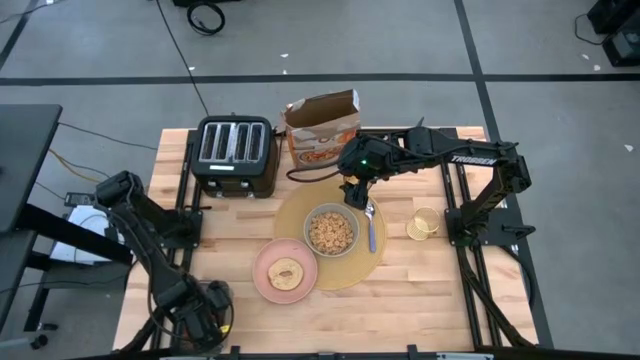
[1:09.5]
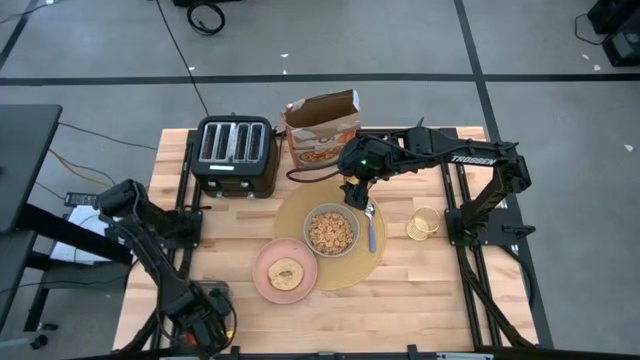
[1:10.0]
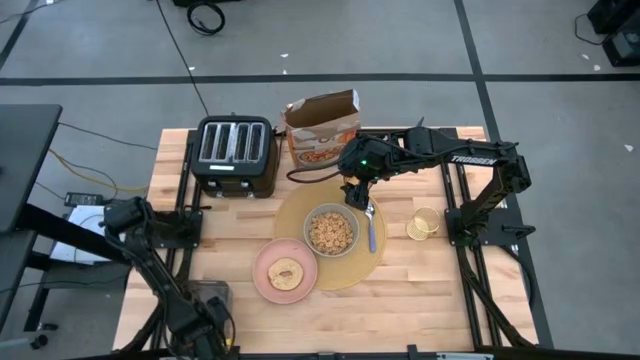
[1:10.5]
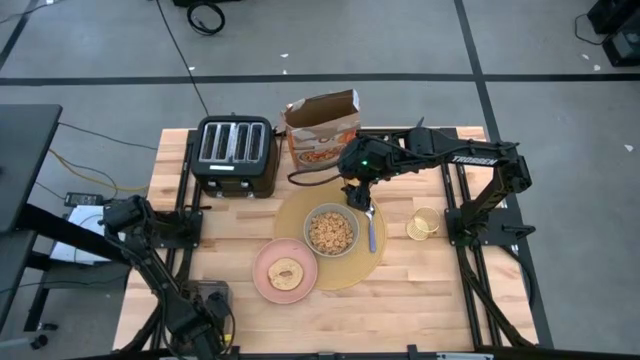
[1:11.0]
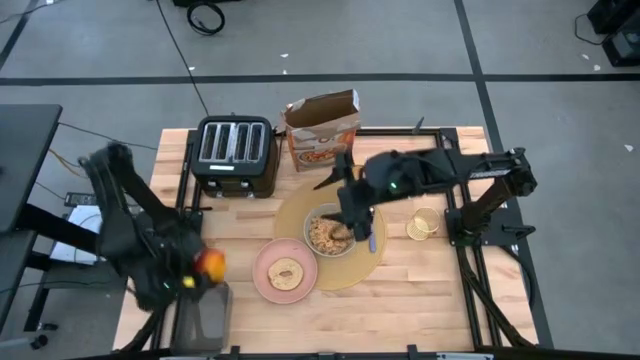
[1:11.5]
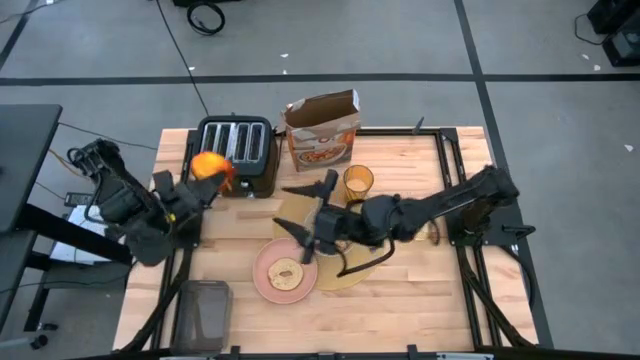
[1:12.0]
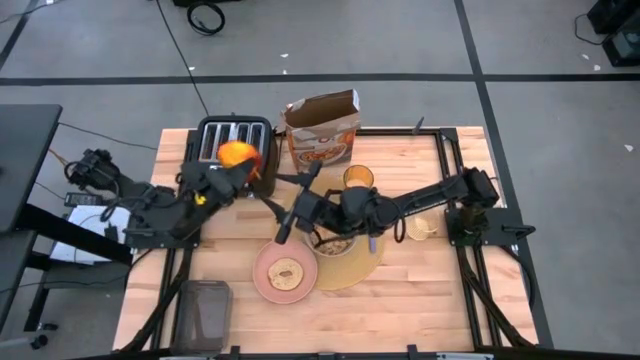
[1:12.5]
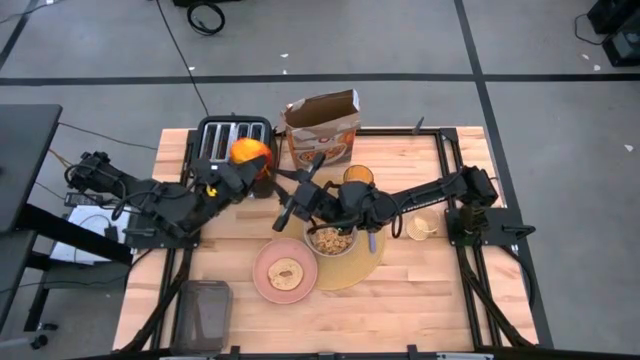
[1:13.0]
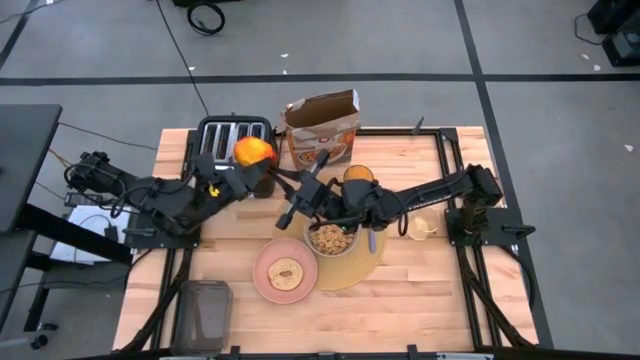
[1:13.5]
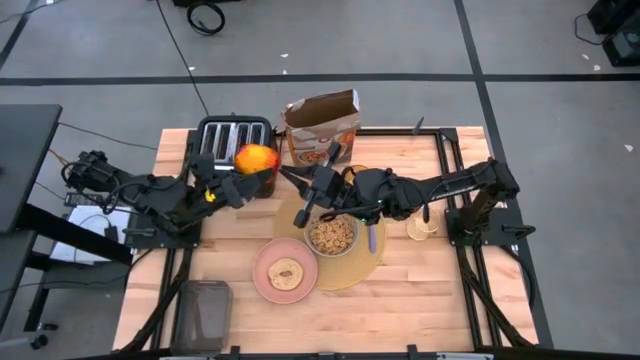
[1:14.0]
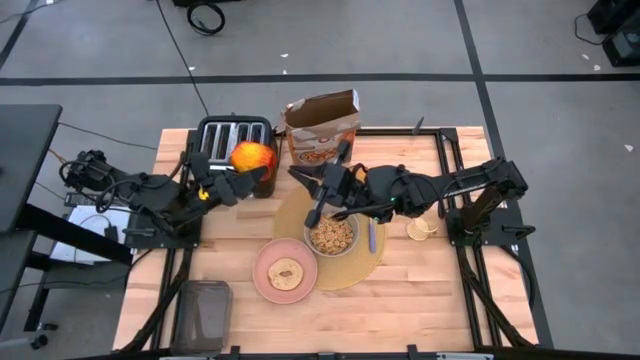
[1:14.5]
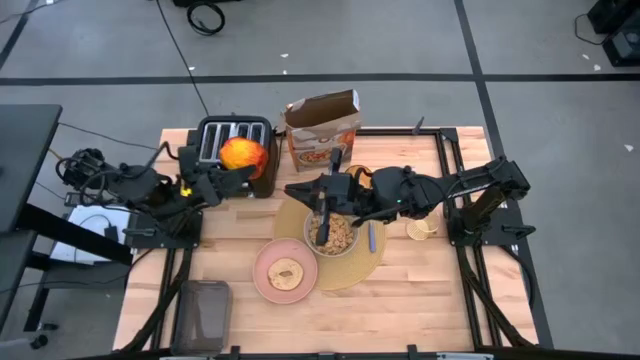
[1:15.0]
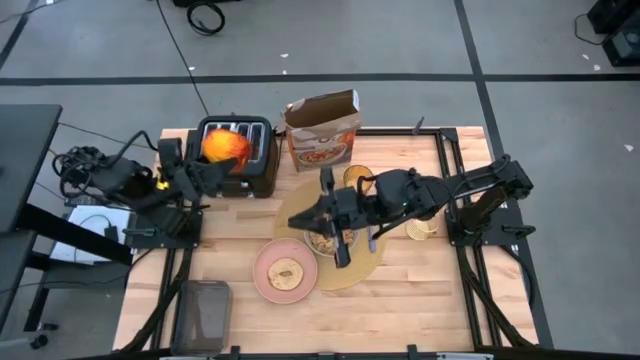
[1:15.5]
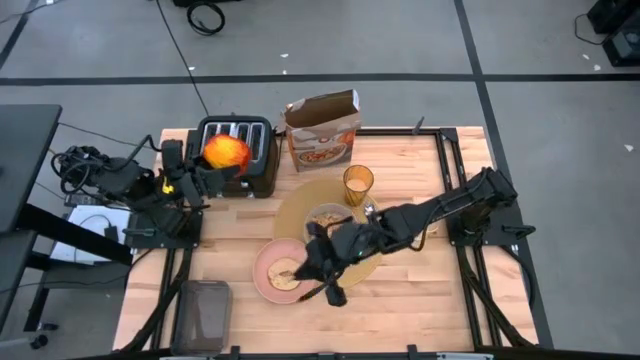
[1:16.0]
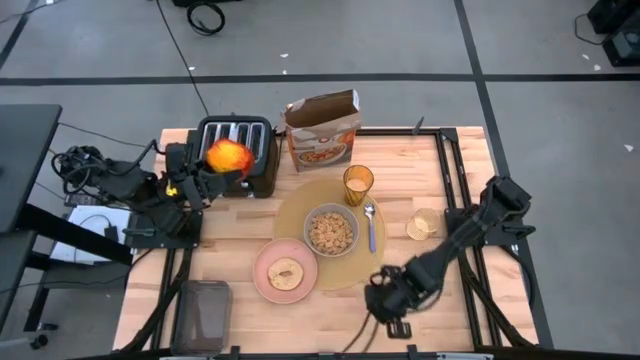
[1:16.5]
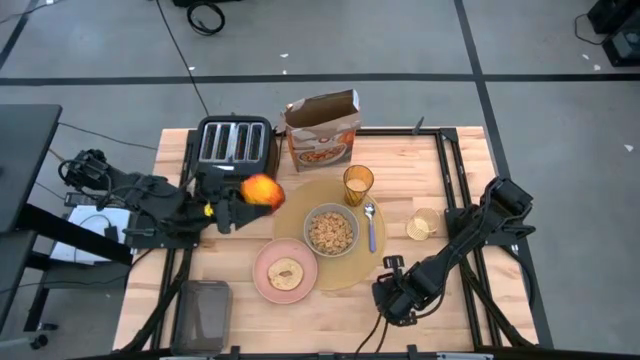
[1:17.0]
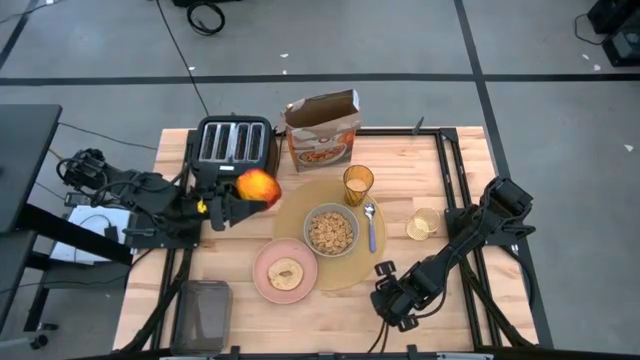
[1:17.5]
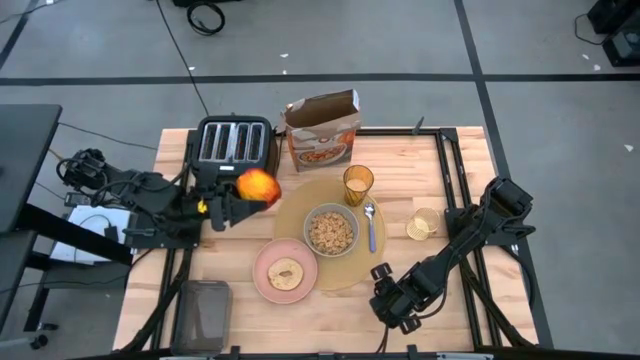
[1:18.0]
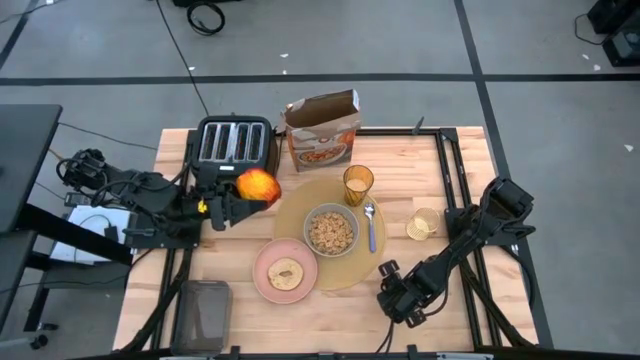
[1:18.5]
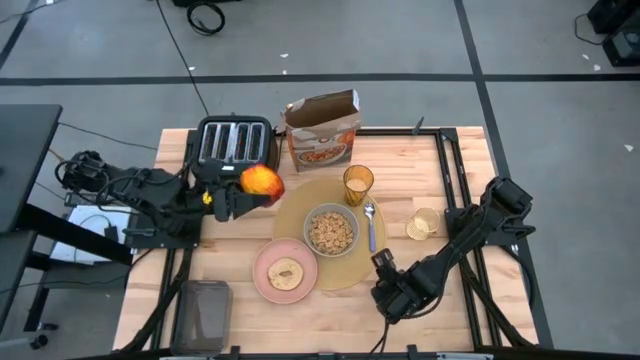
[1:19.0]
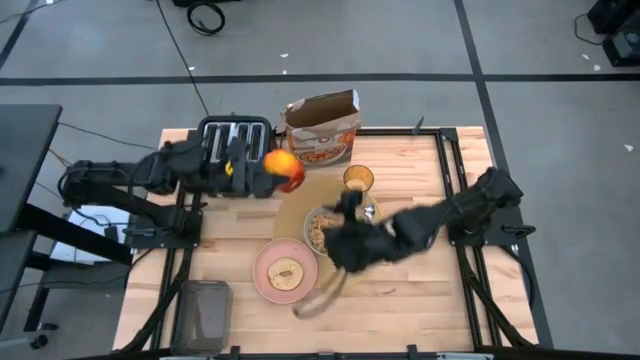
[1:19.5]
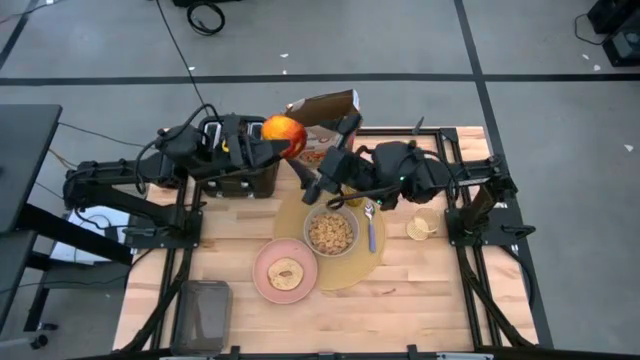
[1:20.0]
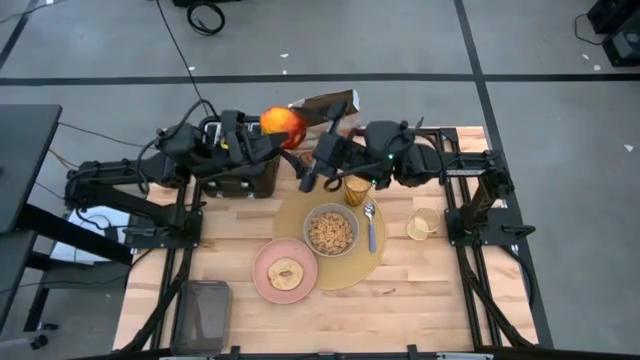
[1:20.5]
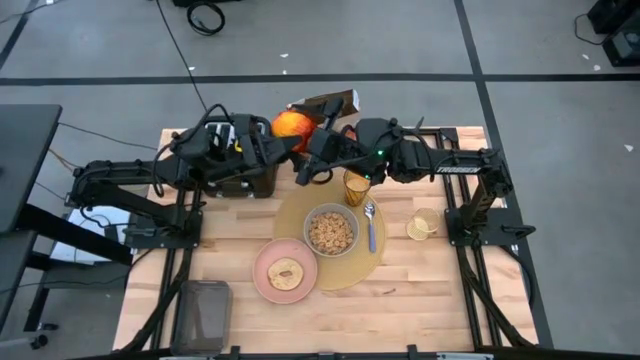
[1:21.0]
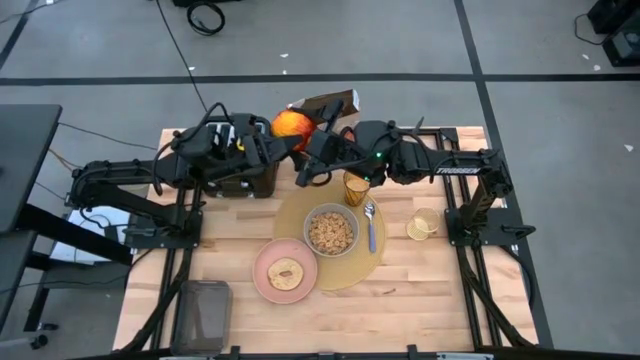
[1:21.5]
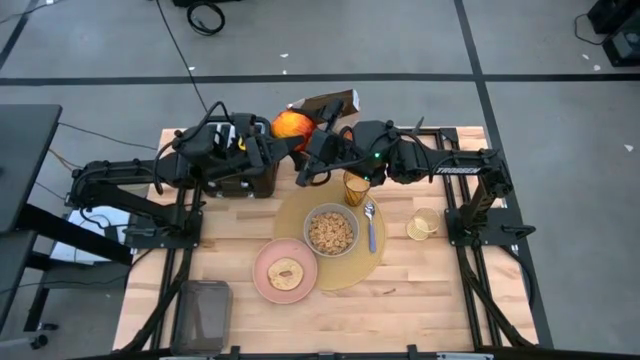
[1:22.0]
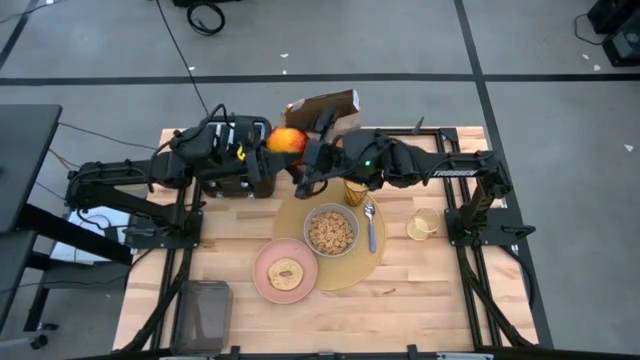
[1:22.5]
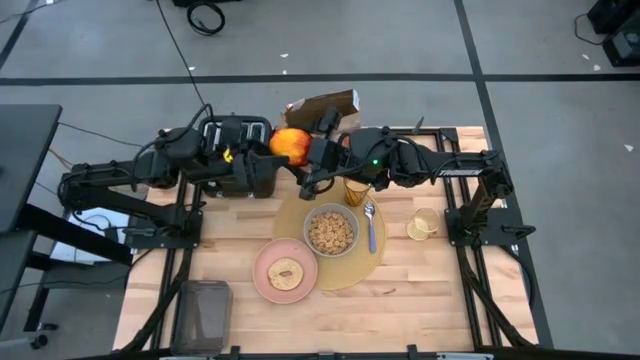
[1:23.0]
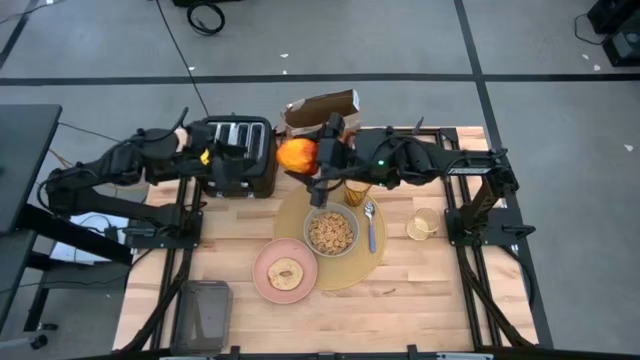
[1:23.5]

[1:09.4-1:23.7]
Task: Arrange a breakfast setting
Put the apple from the black bin on the brown table mat to the top left of the gray bowl

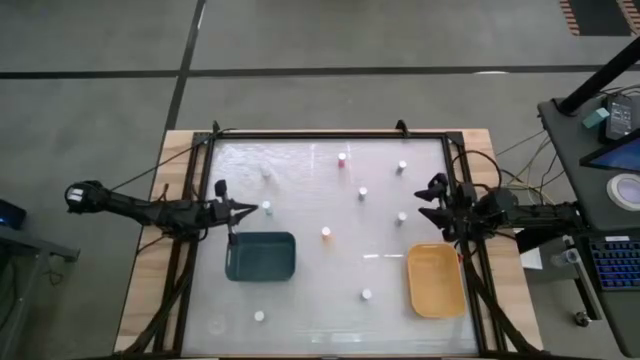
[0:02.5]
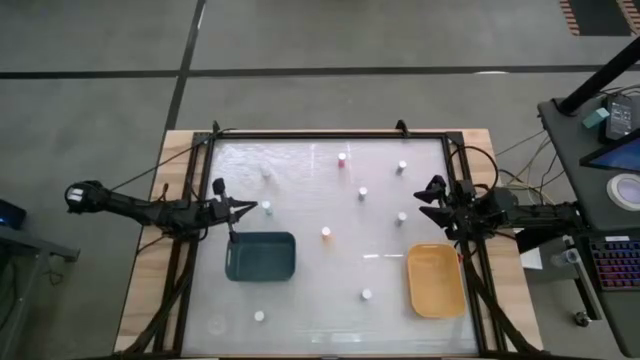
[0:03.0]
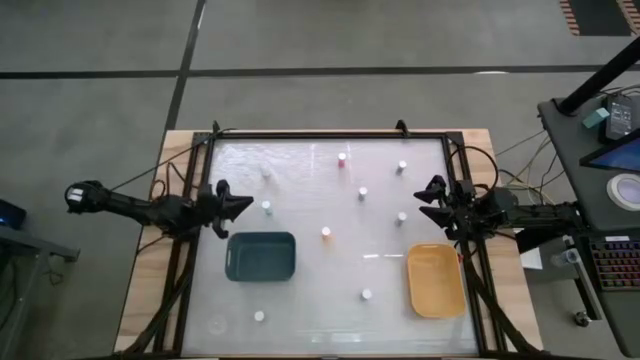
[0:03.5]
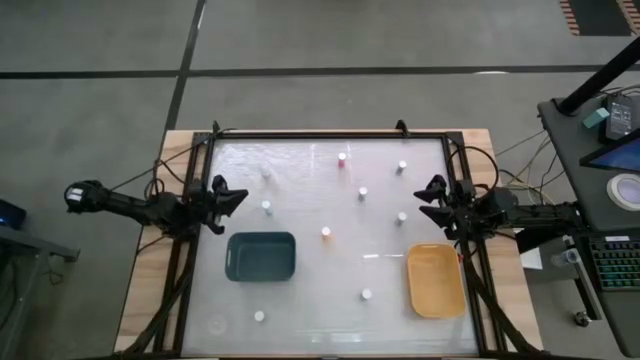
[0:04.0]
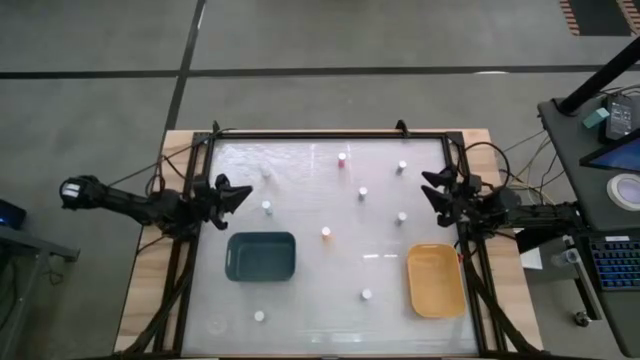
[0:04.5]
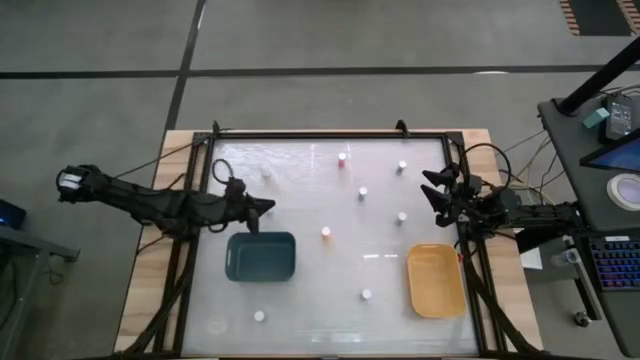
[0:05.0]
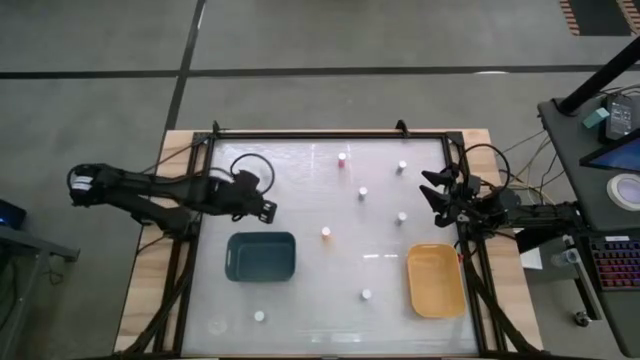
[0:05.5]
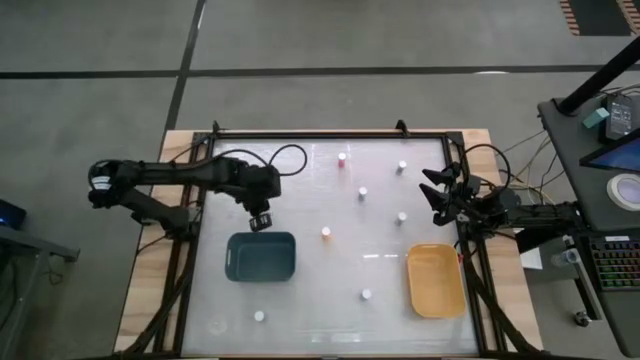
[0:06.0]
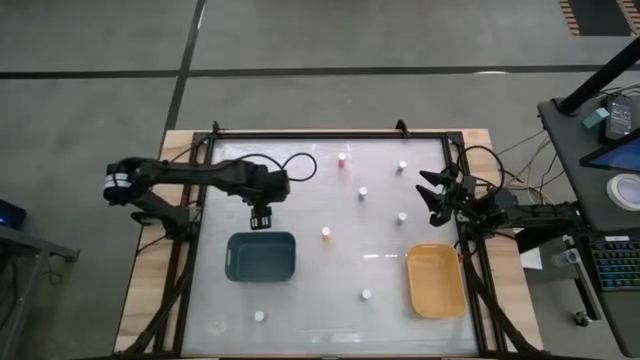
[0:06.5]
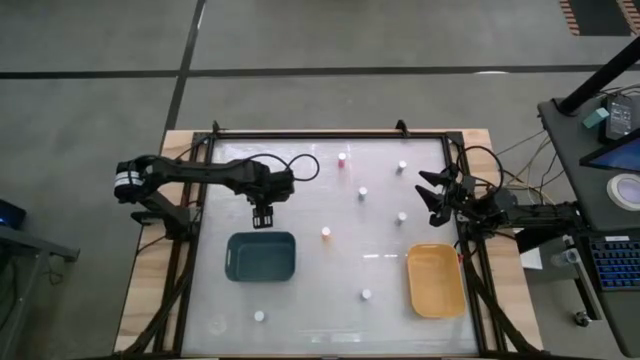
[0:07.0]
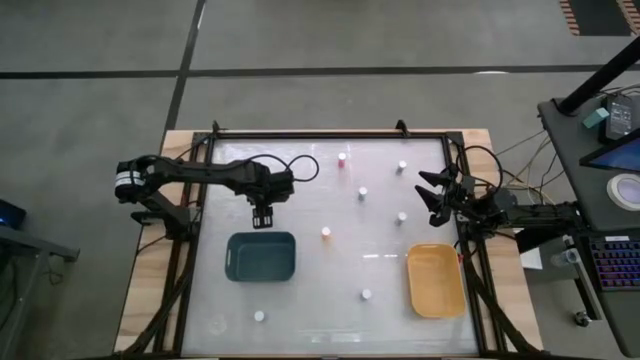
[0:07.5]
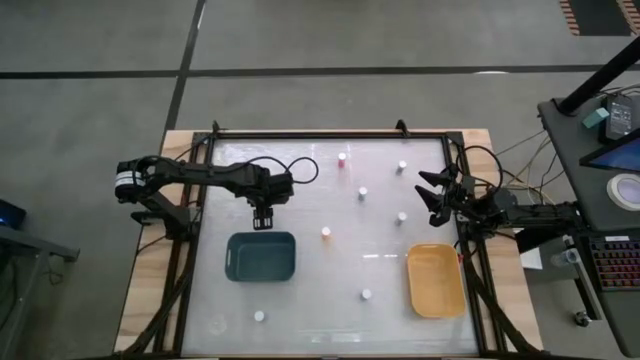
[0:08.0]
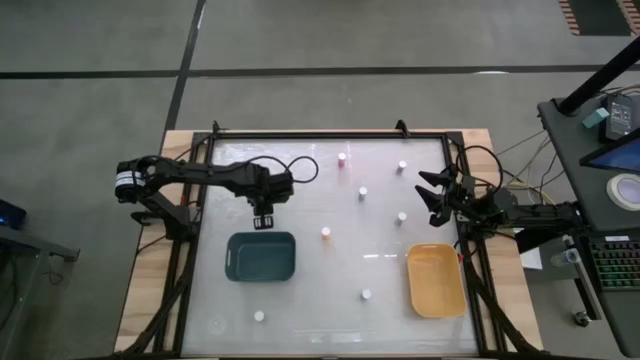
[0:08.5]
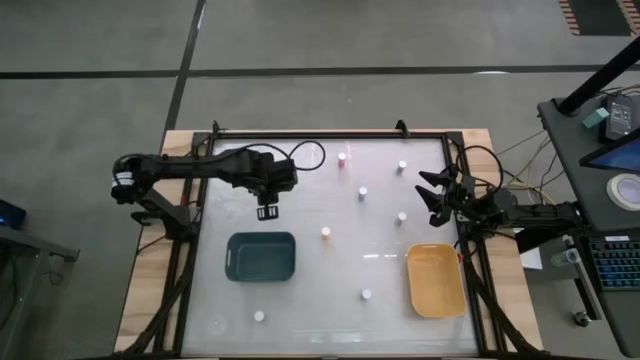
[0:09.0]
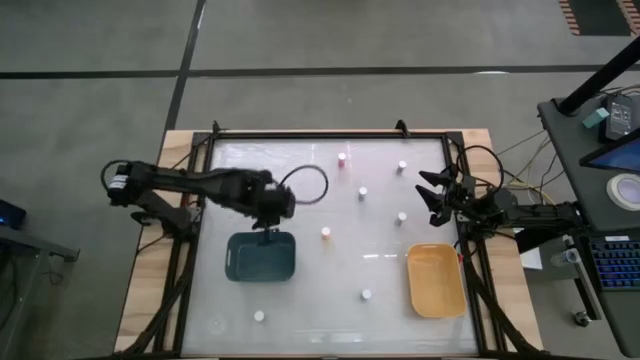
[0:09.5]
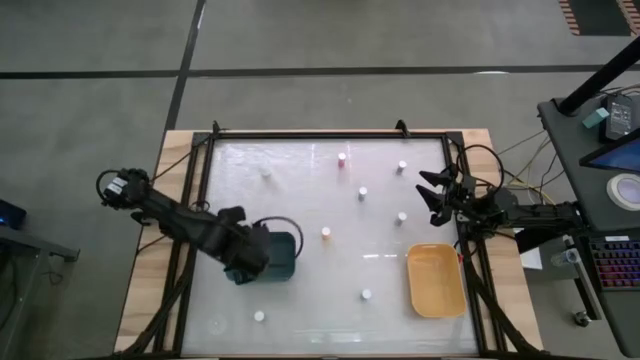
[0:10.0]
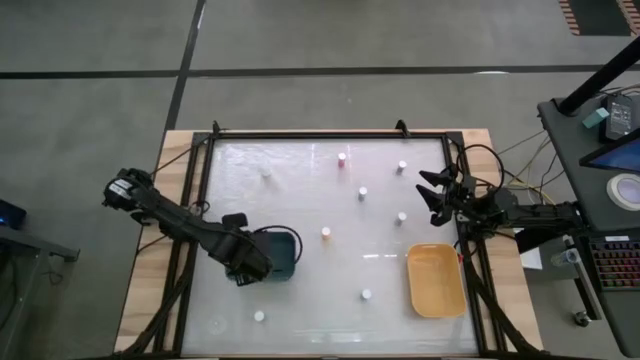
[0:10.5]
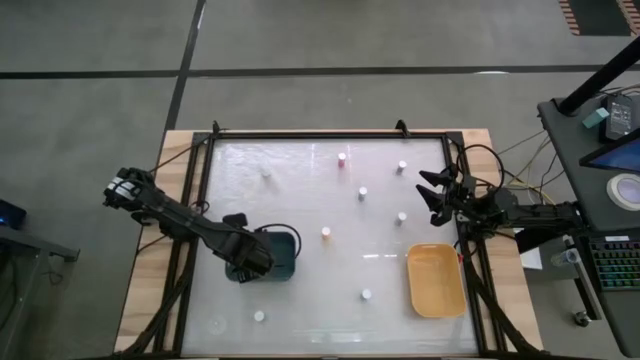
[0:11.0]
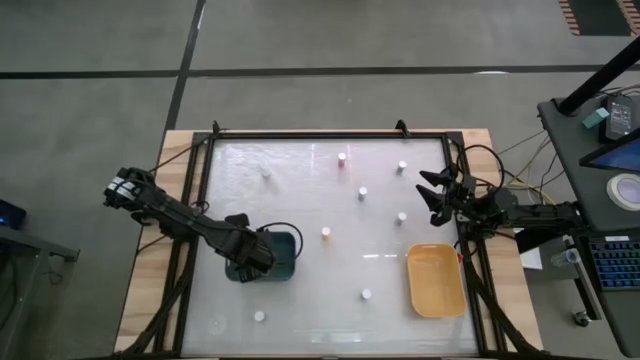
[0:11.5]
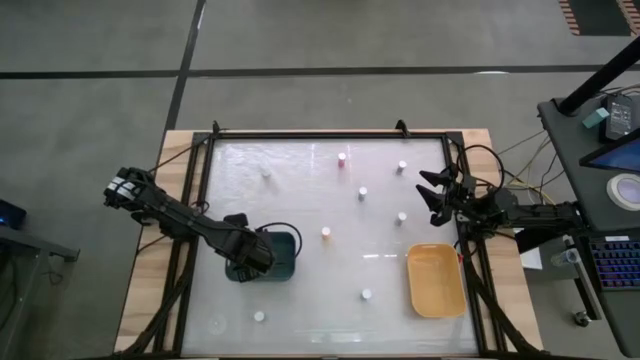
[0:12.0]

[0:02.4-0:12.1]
Task: Pick and place medicine bottles into bin by pill shape (circle, oval)
Put the blue bottled tablets into the green bin
